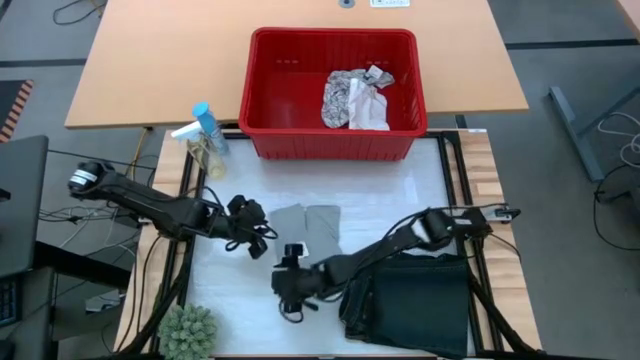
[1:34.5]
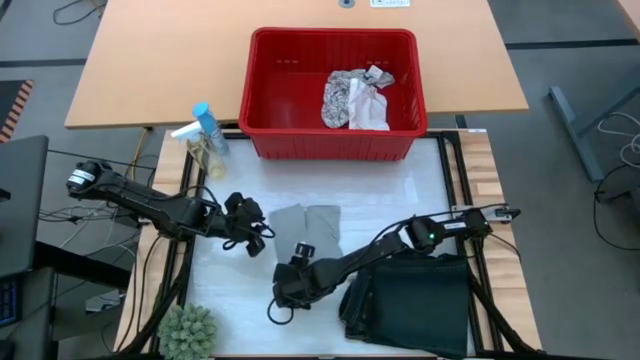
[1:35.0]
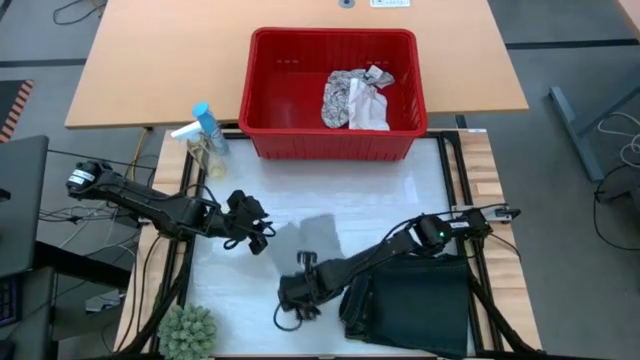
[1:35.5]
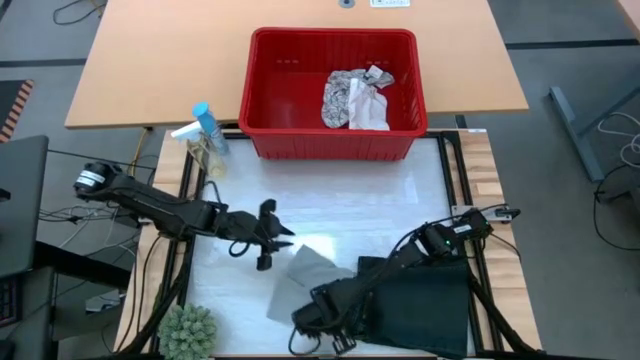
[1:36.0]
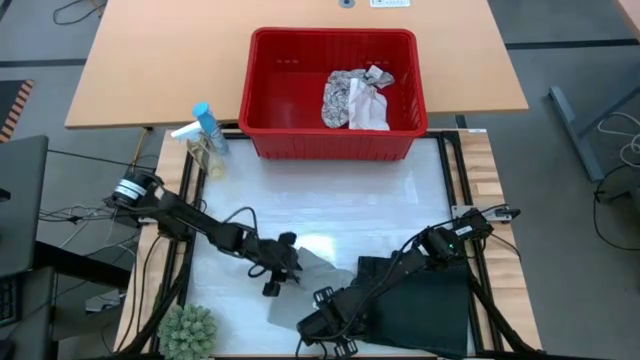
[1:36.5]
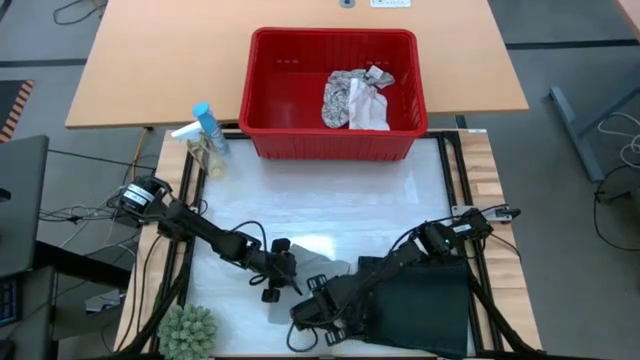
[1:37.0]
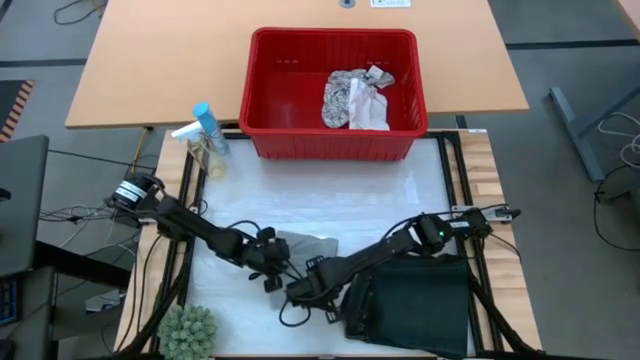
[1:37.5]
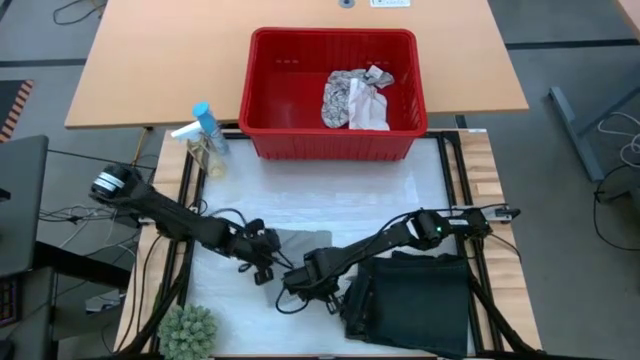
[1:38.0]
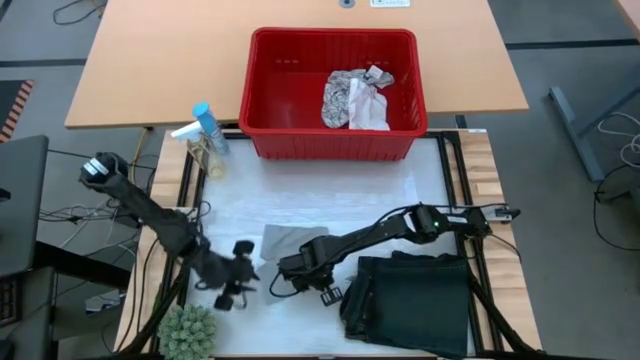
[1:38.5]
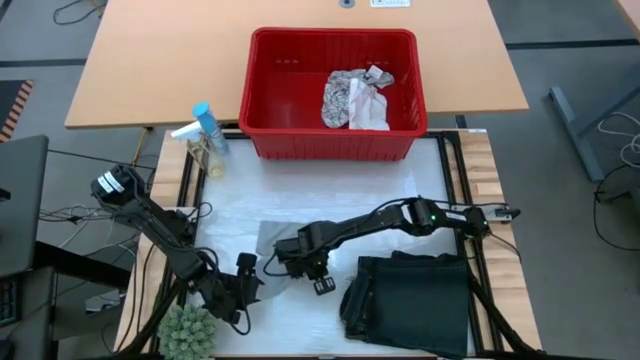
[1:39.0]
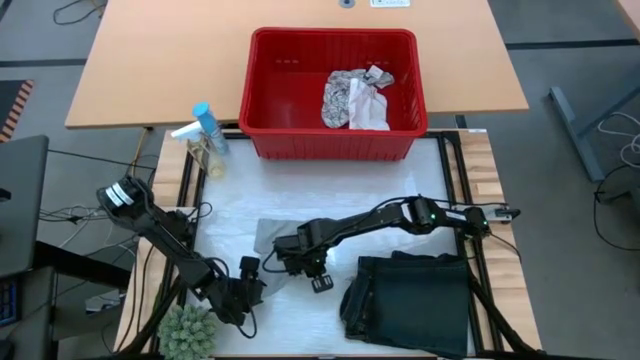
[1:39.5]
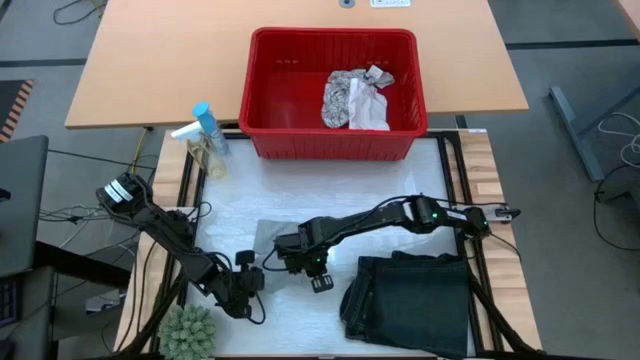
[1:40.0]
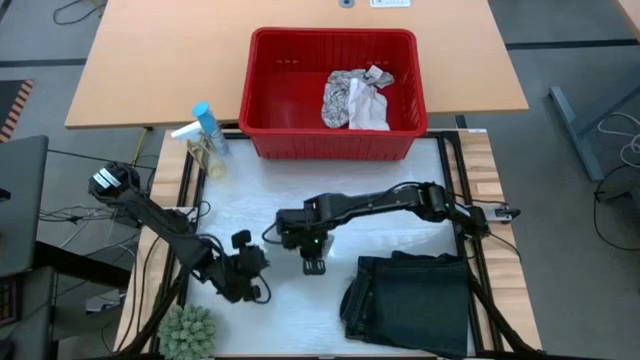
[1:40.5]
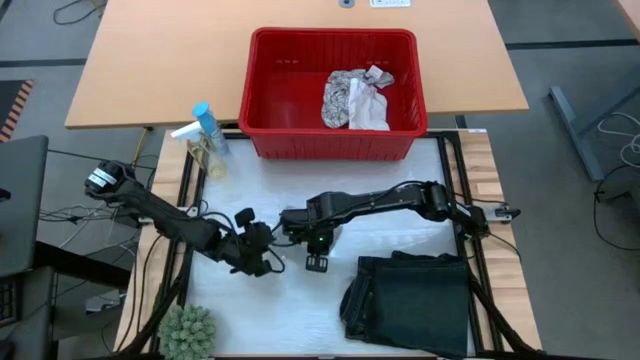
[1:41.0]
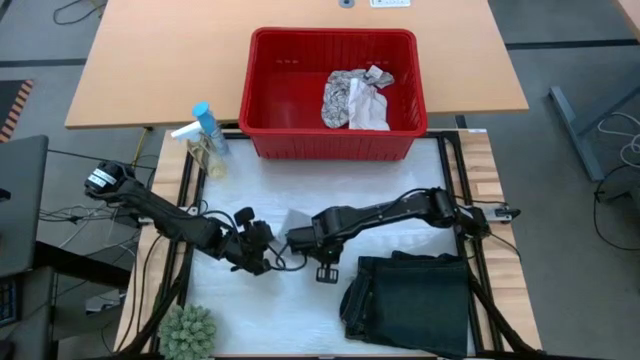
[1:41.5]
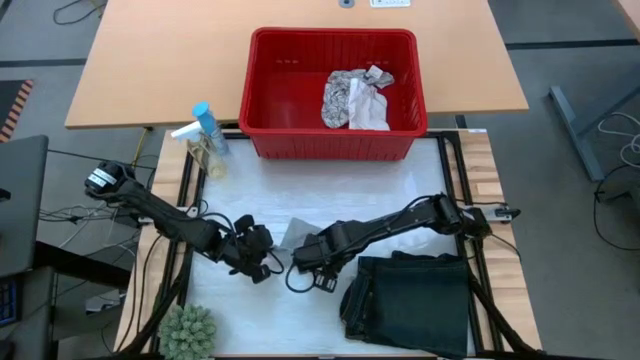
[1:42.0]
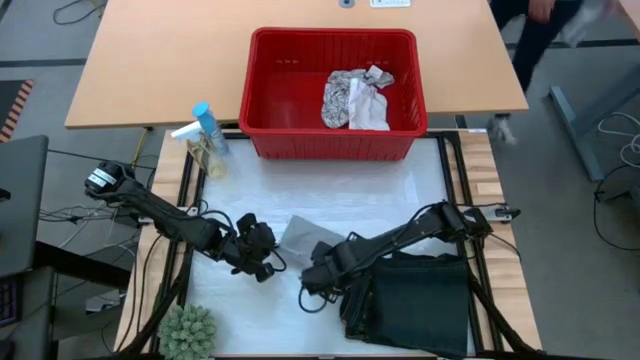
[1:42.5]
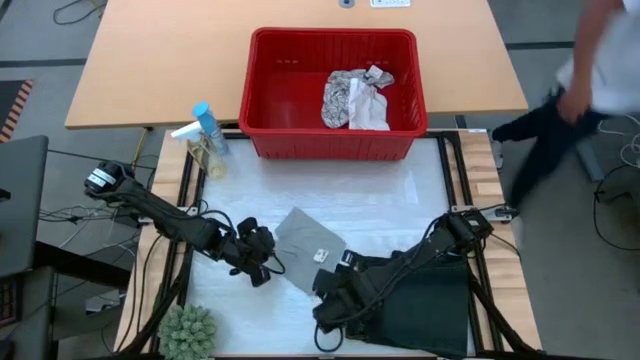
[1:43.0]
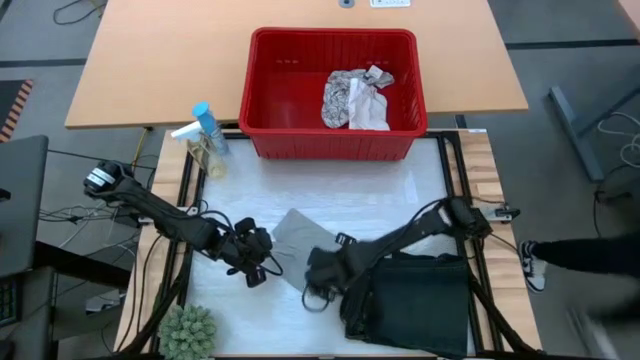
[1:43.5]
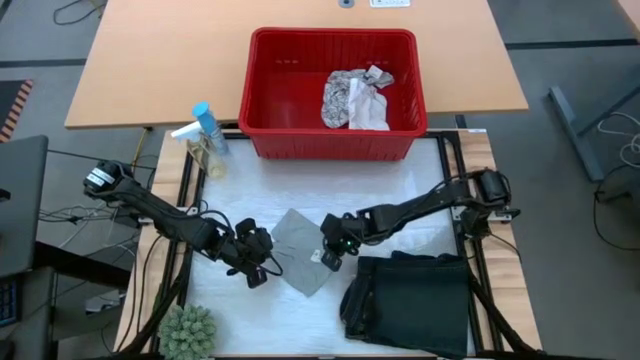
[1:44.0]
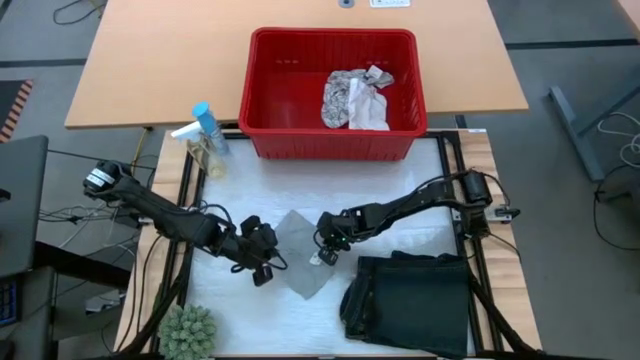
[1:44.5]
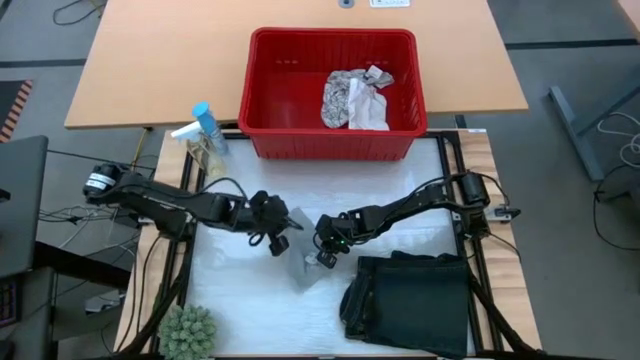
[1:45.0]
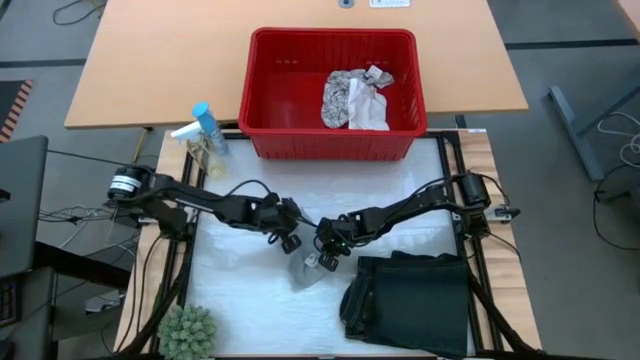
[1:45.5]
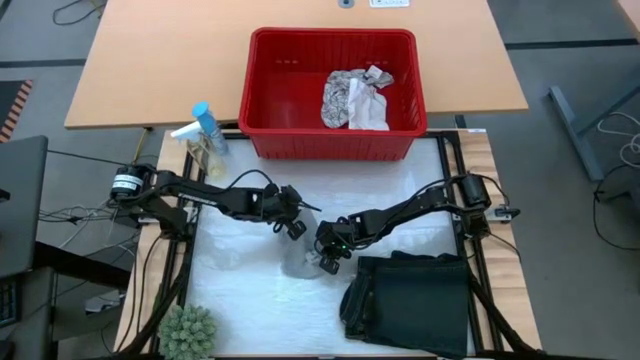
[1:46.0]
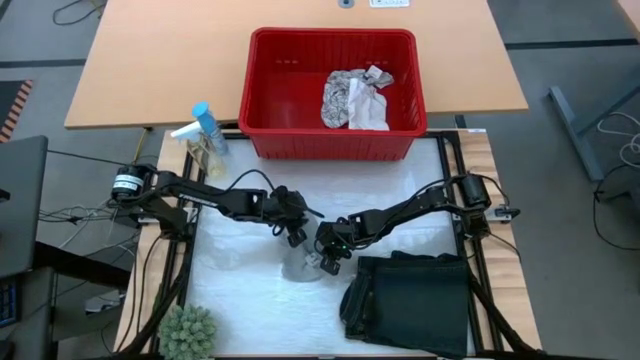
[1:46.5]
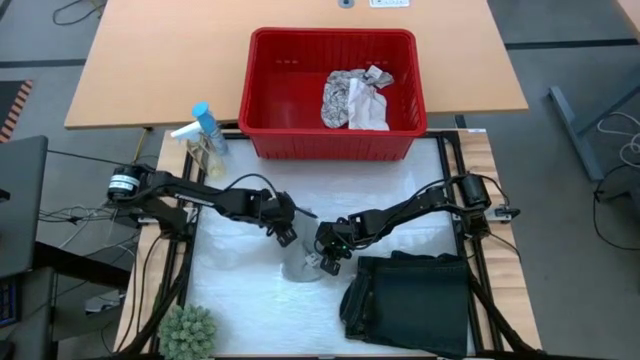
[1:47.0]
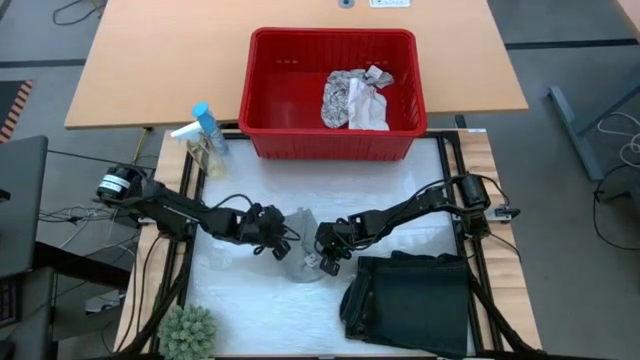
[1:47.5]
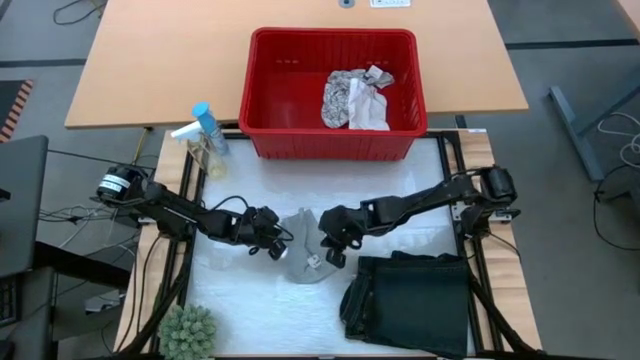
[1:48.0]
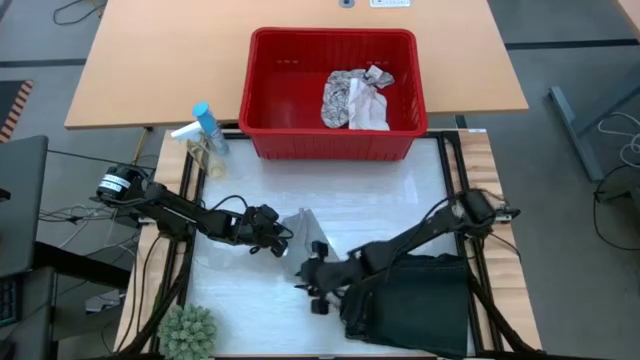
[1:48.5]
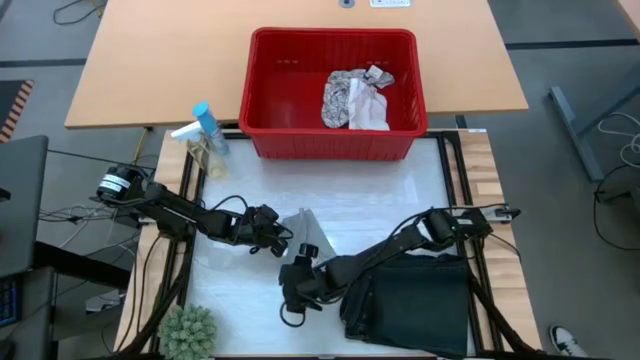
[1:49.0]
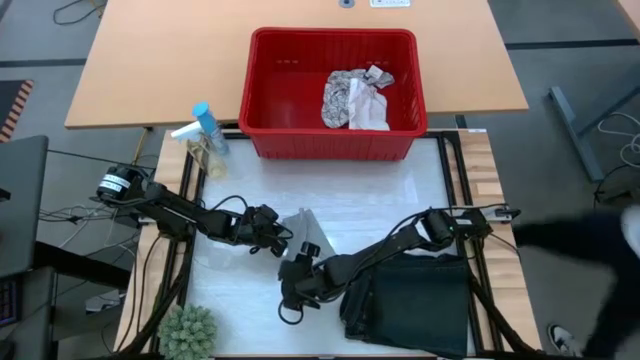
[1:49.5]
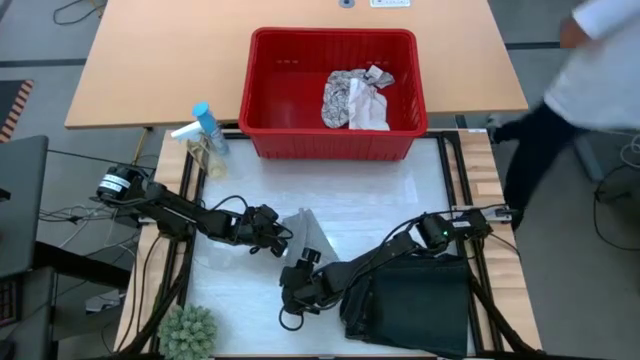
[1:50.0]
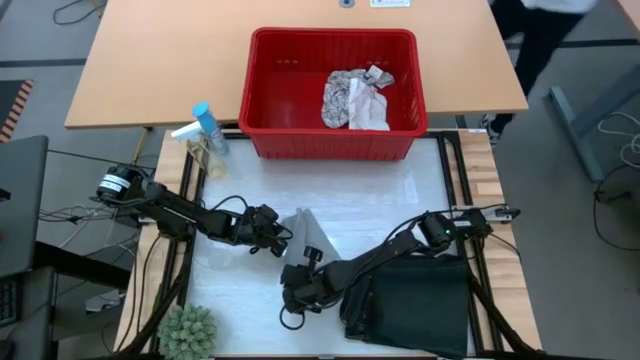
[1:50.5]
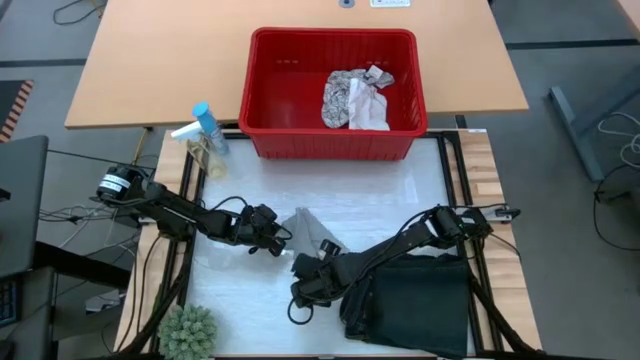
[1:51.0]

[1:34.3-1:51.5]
Task: Fold Laundry from Bin
Fold the gray boxer from the red laundry bin

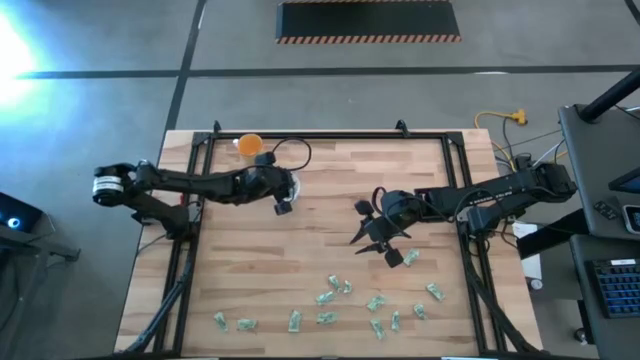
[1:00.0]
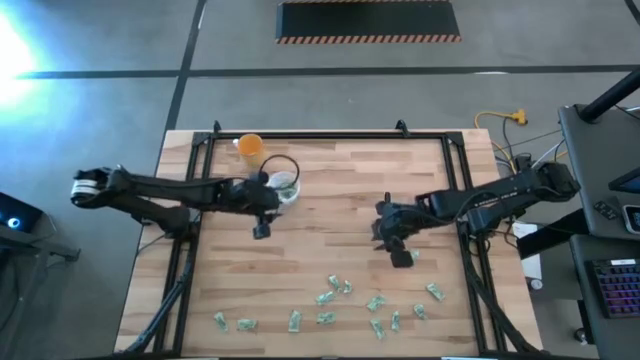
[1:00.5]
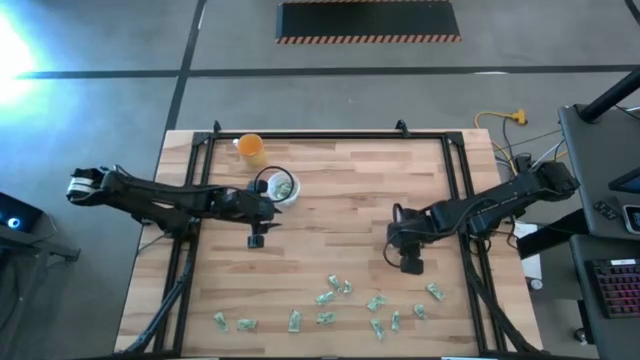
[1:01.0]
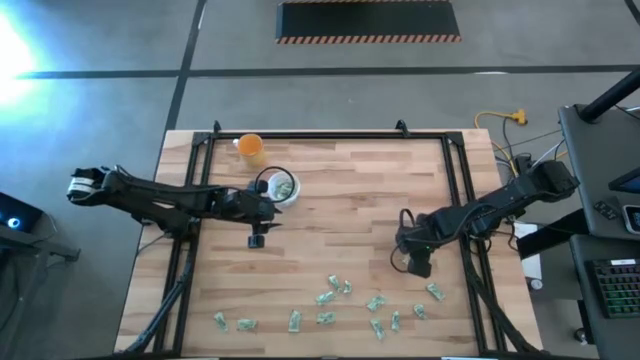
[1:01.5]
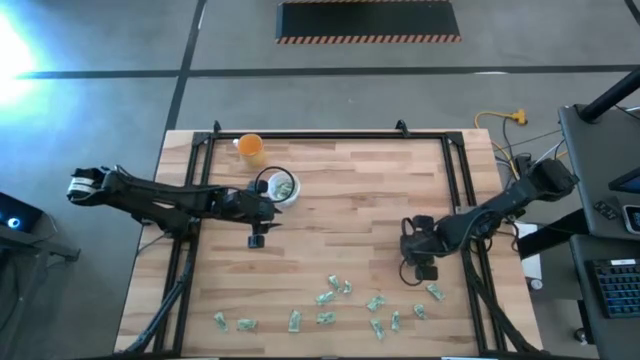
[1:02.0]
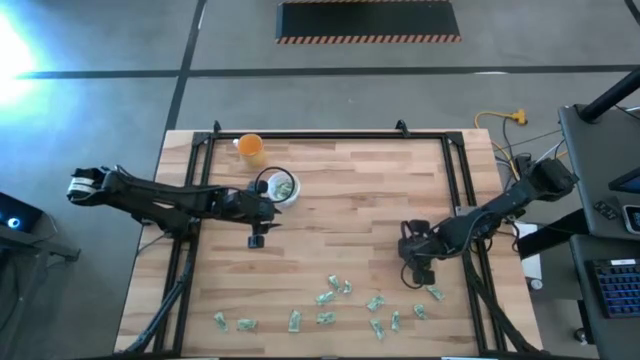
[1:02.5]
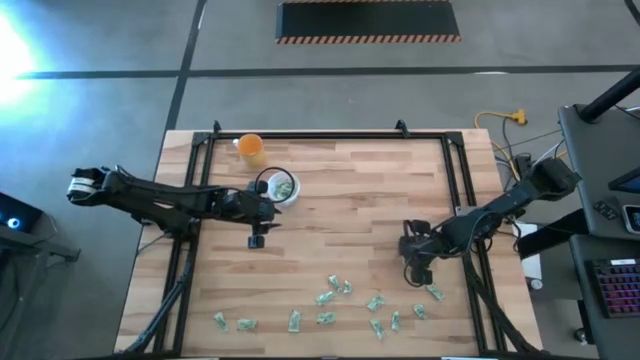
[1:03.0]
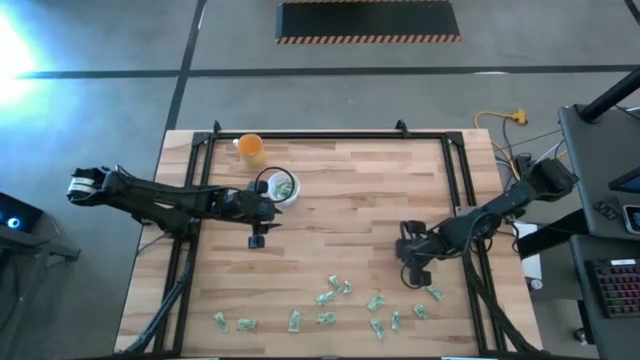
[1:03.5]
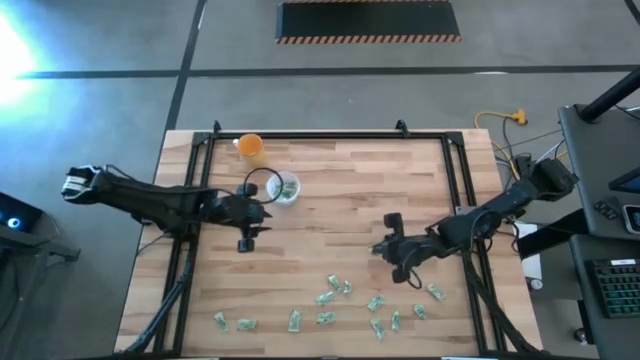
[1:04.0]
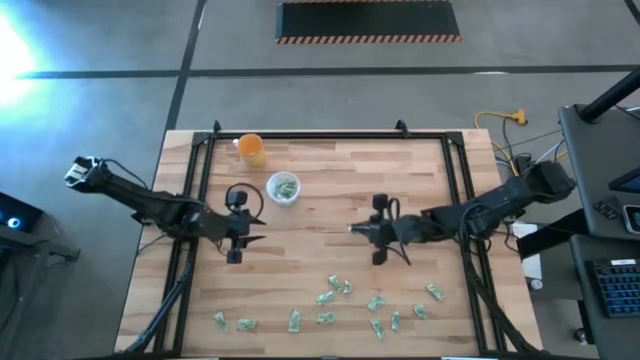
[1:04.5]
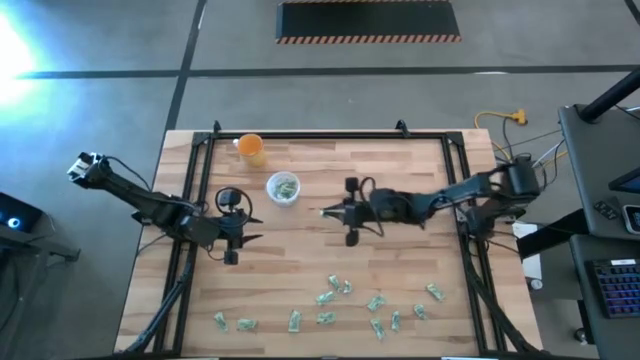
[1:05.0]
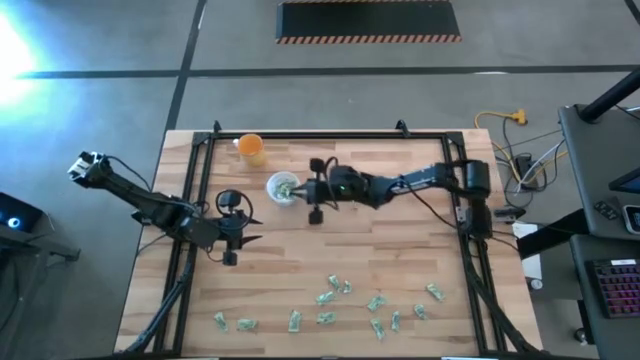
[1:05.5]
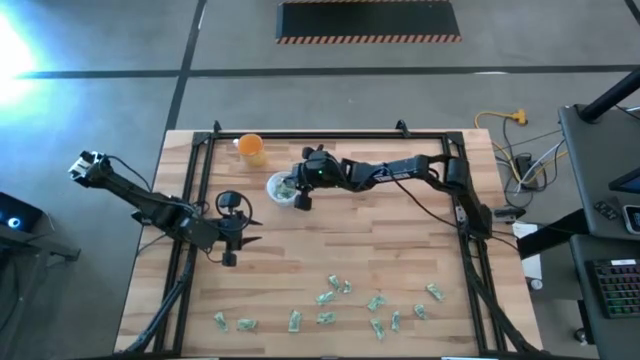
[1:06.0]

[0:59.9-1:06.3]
Task: Pick and place Stevia / Truvia into bins
Put the stevia packet into the transparent container
